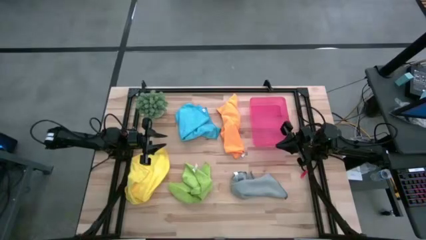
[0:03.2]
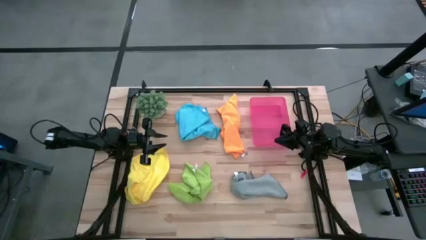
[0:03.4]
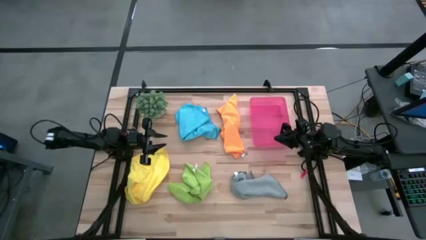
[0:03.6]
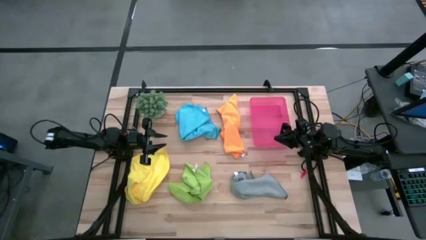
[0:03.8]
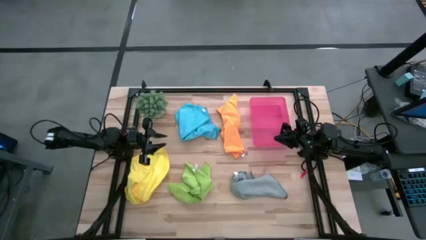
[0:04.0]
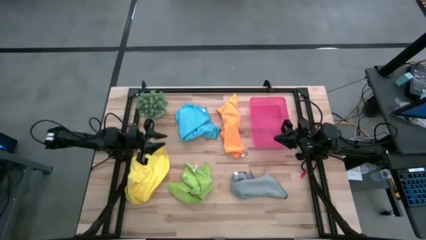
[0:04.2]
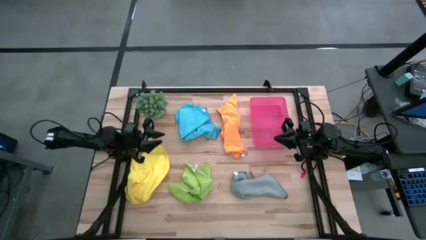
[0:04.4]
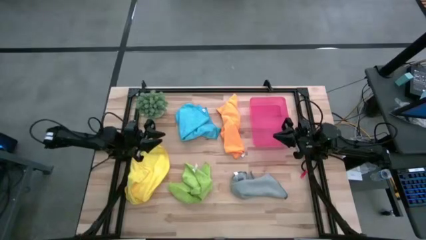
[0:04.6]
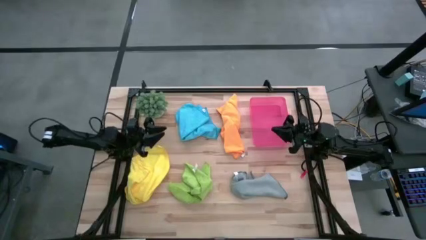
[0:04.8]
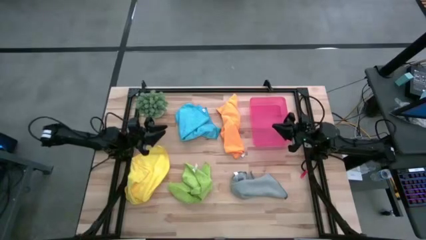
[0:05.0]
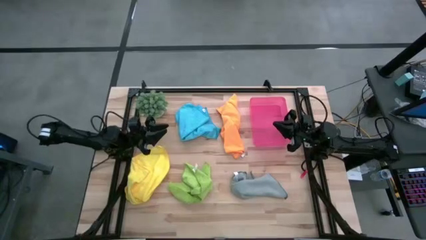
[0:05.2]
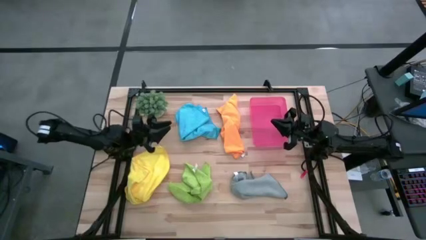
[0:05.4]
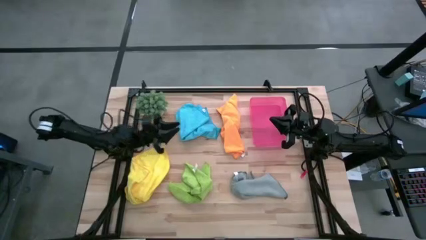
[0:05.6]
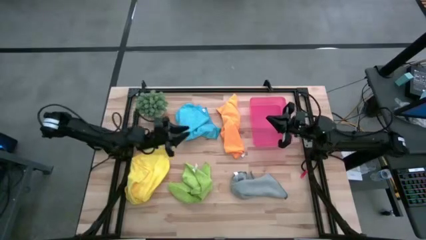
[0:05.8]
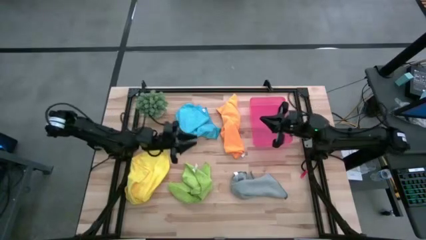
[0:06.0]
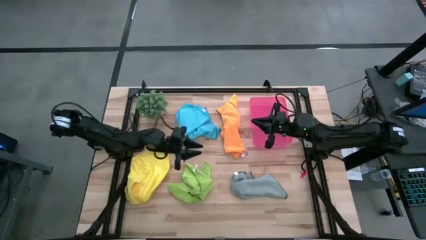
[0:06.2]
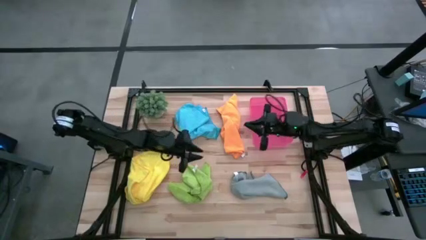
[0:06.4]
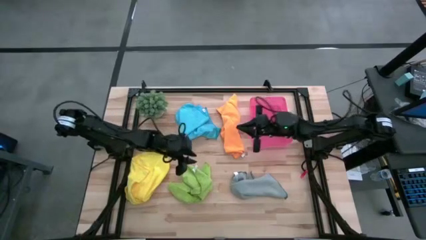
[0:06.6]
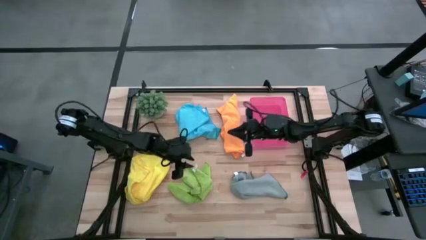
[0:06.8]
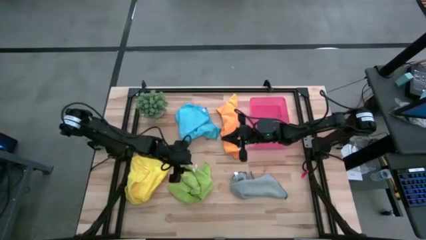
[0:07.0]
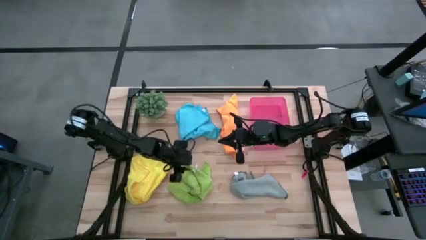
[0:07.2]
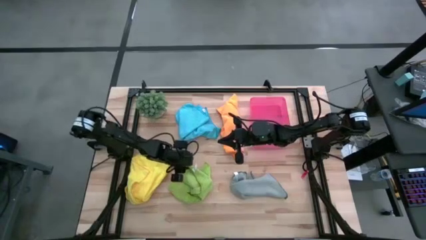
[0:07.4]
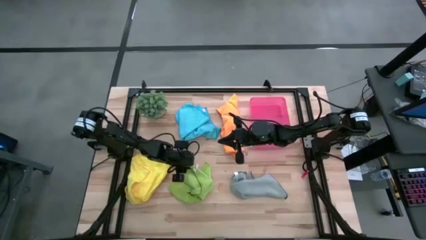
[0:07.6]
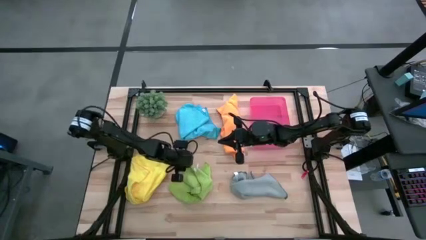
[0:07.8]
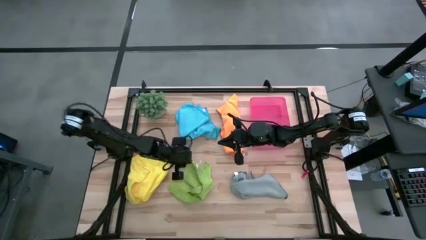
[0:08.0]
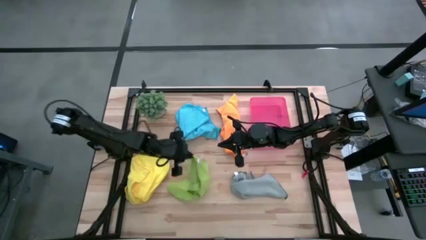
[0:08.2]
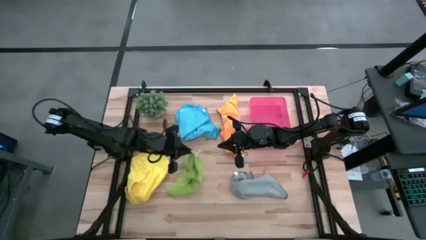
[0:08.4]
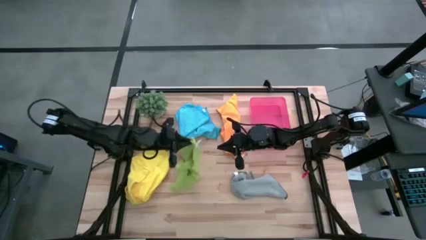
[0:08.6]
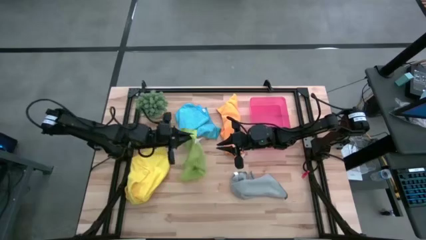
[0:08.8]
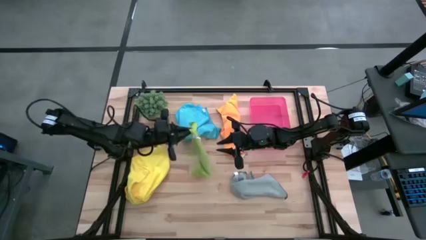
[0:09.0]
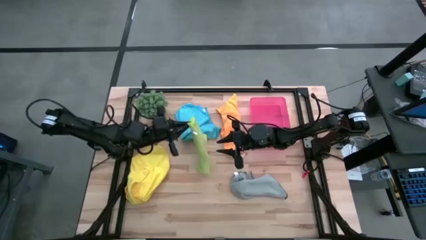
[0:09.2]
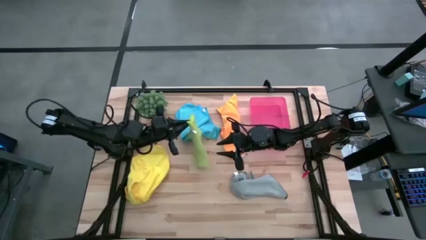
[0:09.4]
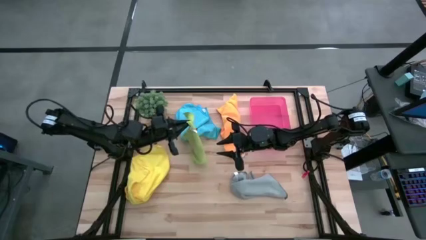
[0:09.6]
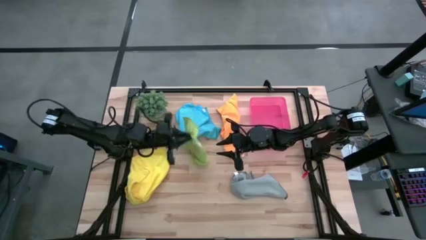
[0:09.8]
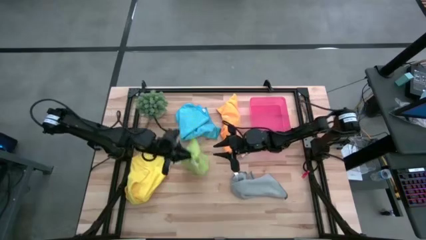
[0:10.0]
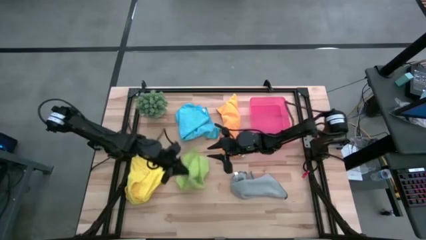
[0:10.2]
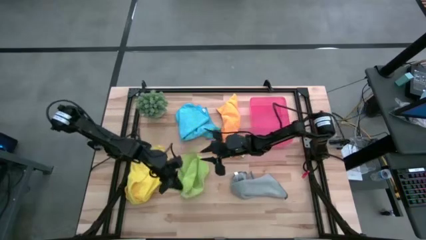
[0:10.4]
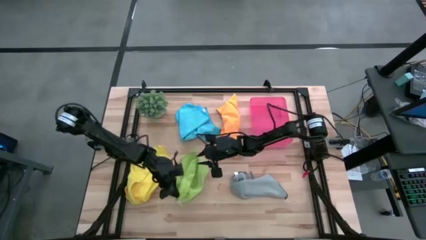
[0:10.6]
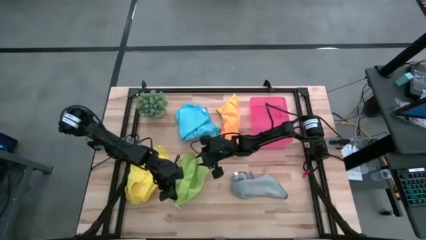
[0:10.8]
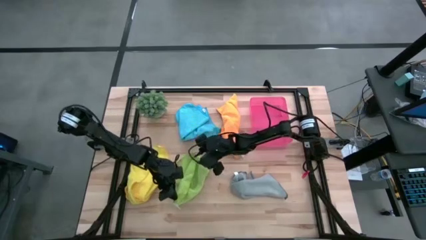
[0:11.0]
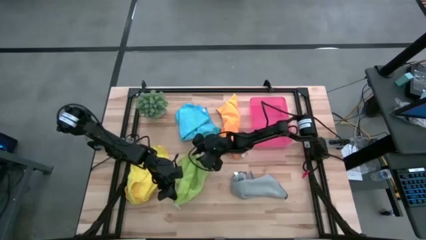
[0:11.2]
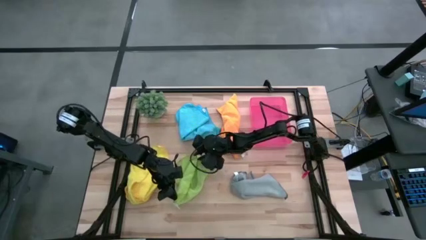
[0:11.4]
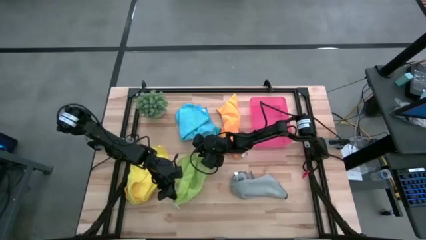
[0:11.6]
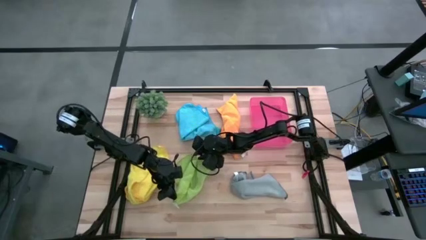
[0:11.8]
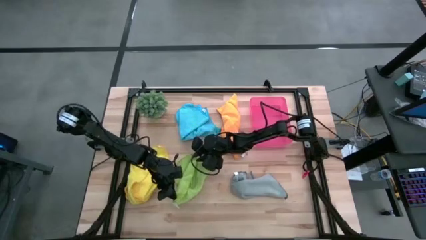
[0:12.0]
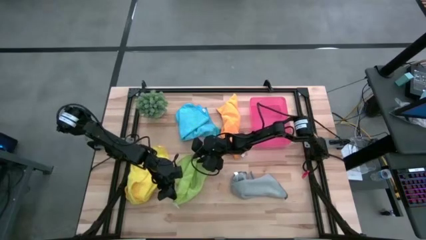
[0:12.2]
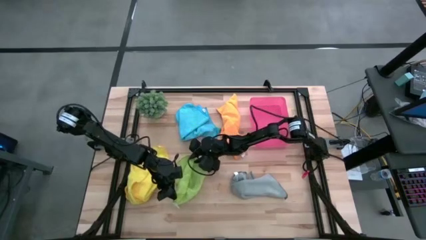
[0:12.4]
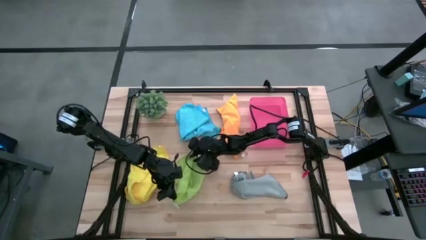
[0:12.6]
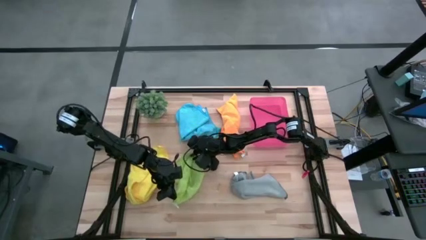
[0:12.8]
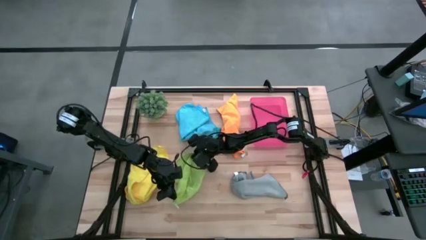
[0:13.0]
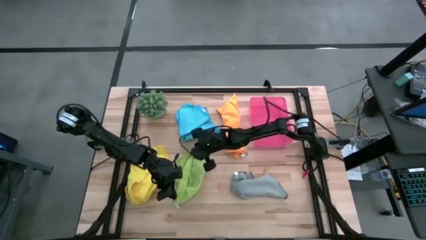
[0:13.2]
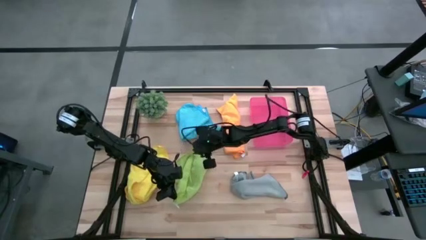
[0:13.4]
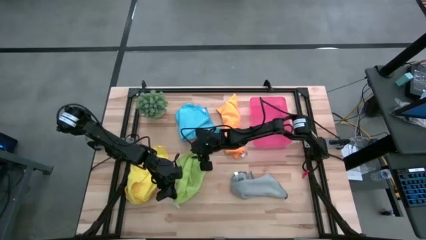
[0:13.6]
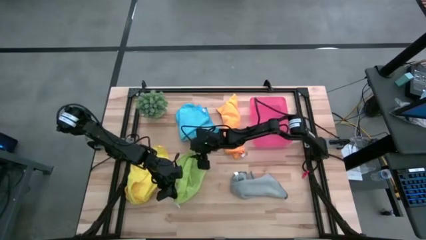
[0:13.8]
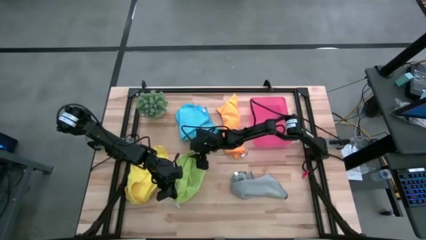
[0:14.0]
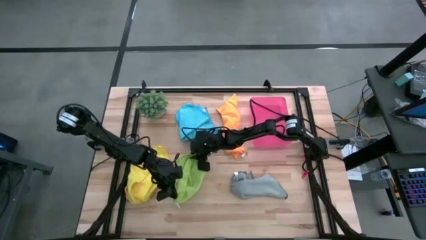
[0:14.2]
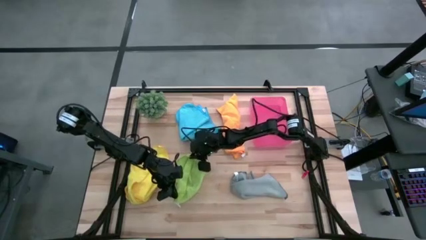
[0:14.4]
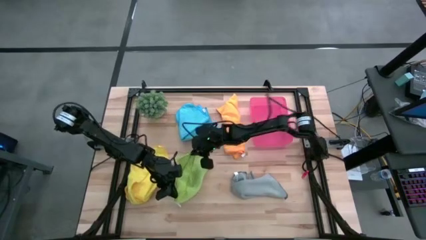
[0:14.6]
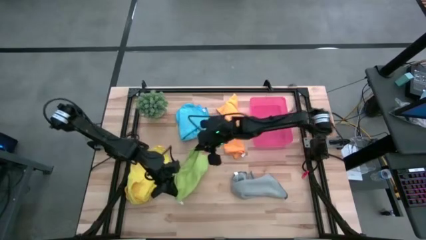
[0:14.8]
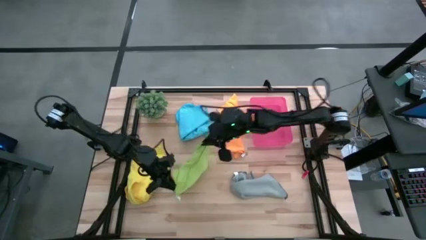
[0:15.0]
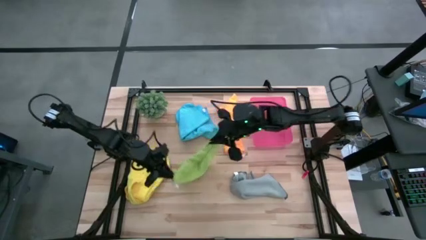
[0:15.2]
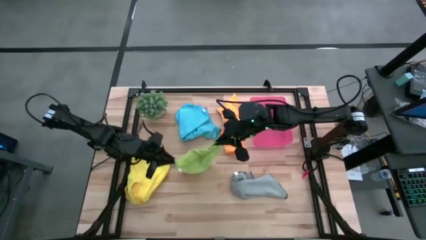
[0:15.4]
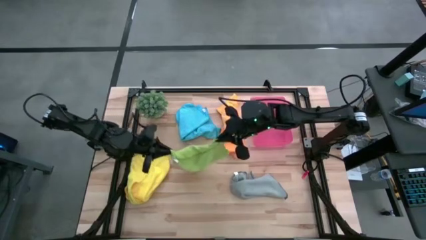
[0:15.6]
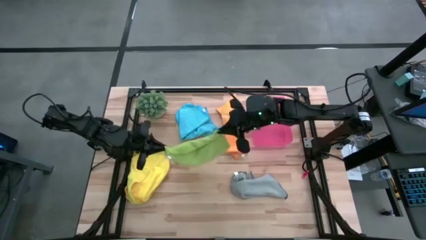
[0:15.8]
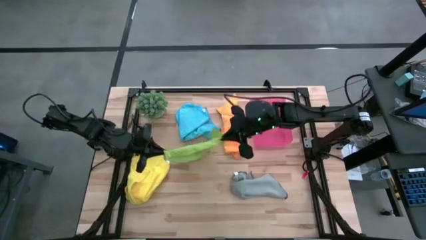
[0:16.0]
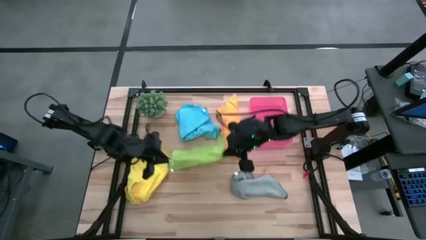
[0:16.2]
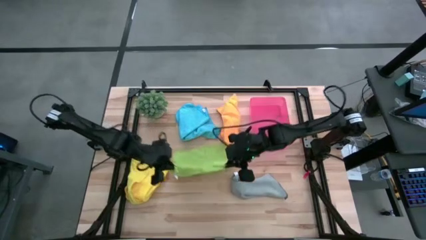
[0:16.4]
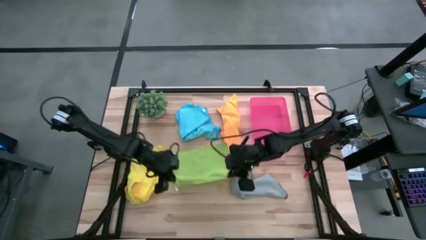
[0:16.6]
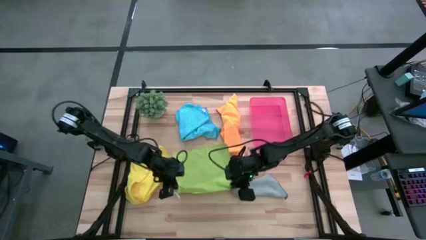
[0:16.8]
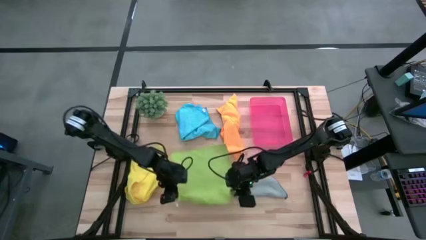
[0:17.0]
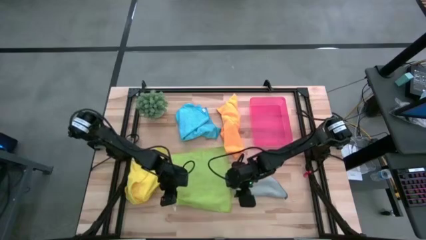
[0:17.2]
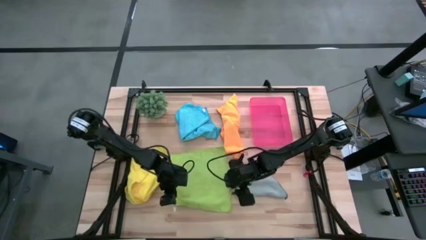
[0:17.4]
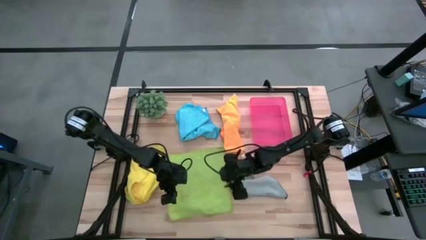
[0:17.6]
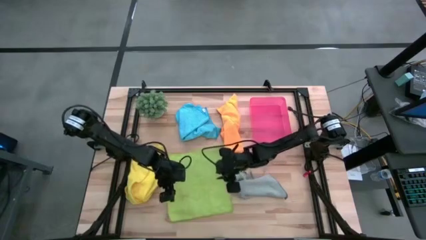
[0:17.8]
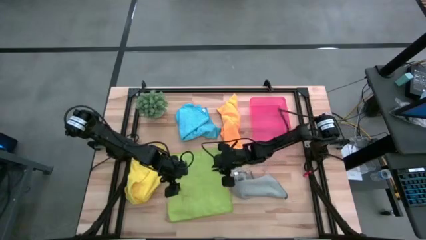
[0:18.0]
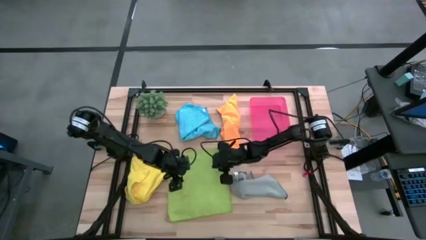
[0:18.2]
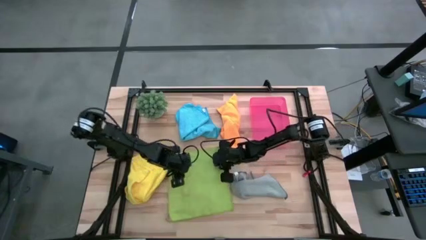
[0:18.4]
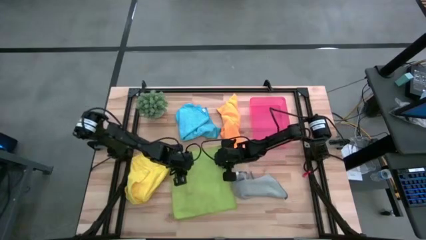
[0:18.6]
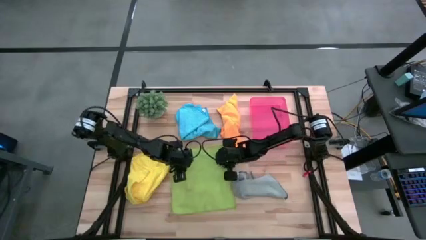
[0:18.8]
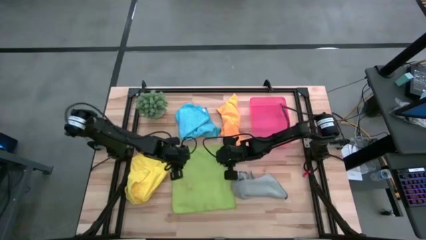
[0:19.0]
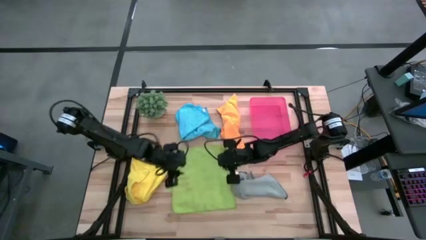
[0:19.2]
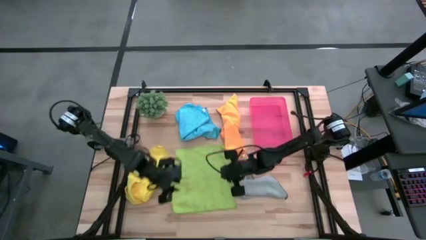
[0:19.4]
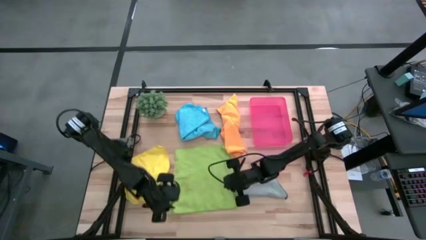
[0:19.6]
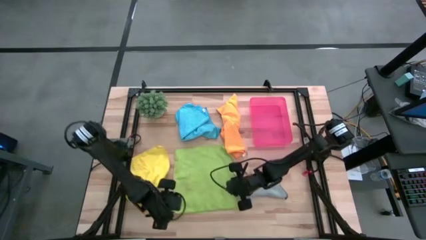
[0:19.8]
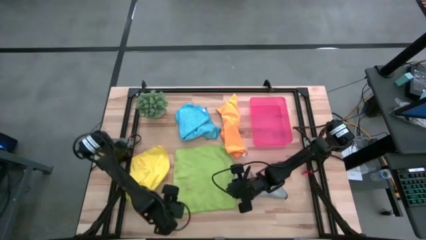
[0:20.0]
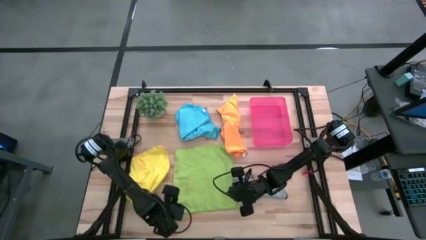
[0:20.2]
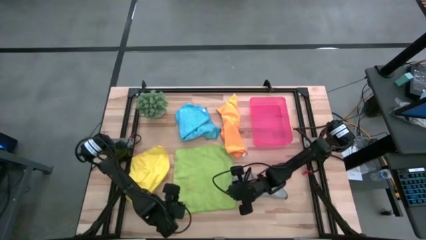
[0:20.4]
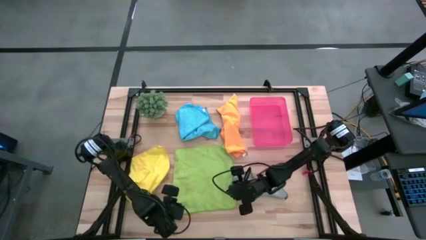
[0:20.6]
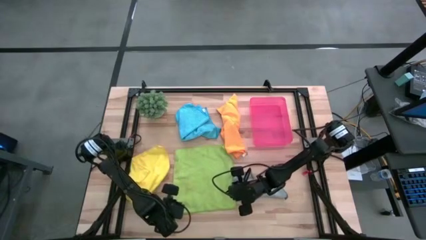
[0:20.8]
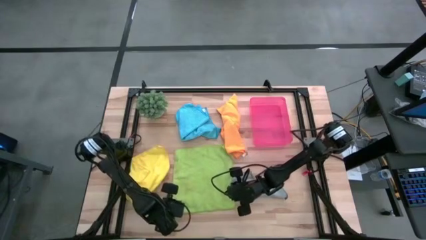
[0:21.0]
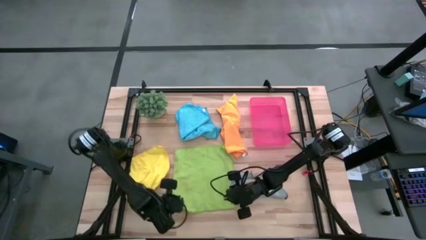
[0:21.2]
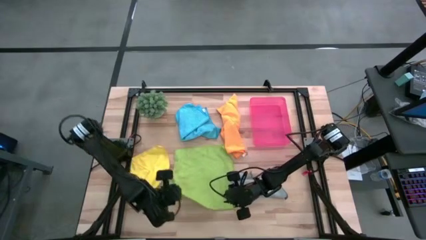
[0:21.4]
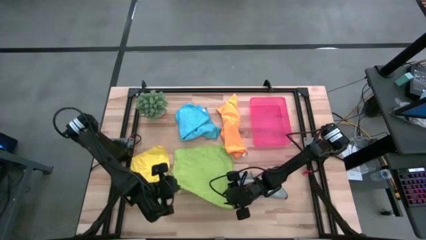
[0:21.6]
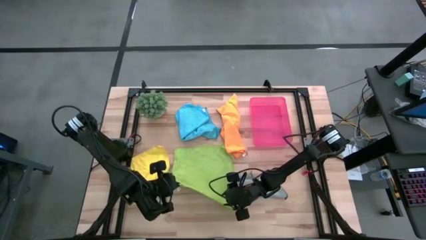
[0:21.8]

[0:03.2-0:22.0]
Task: Fold microfiber towels
Fold the green microfiber cloth
